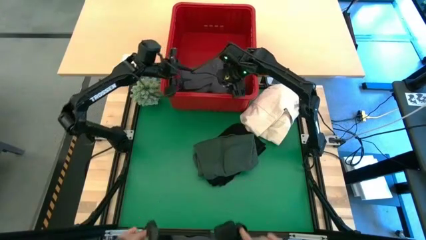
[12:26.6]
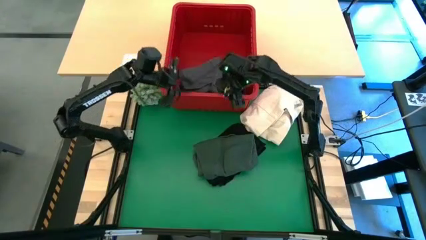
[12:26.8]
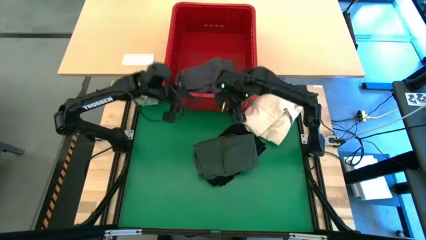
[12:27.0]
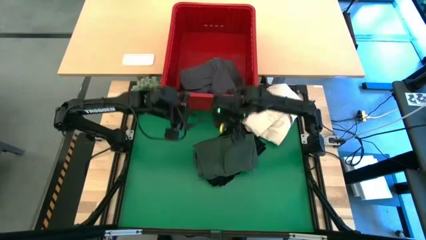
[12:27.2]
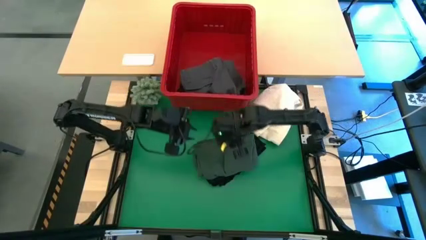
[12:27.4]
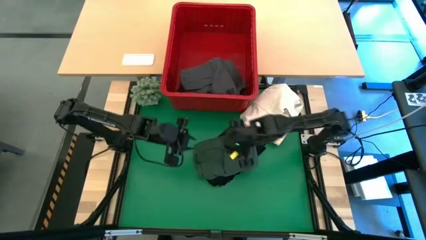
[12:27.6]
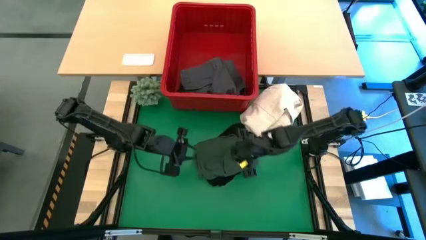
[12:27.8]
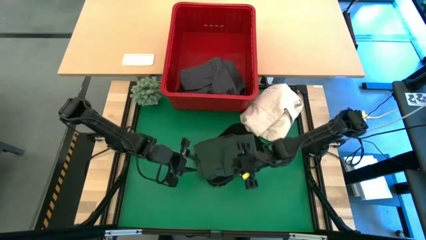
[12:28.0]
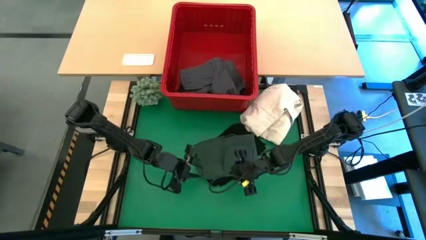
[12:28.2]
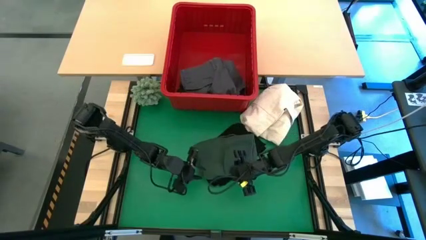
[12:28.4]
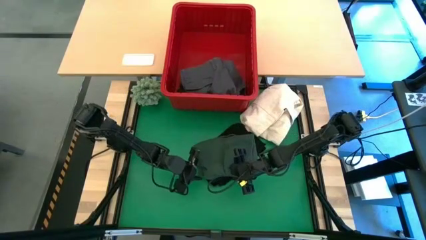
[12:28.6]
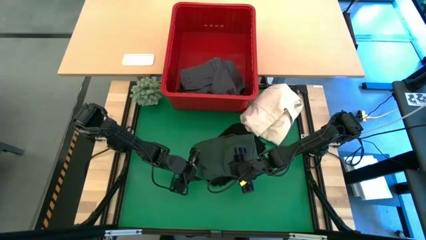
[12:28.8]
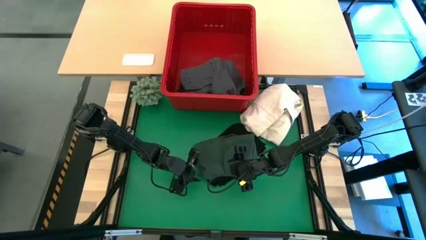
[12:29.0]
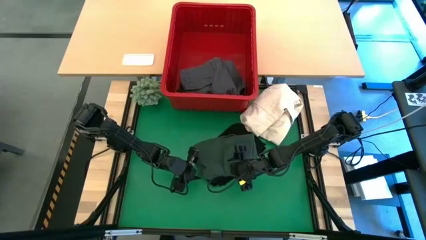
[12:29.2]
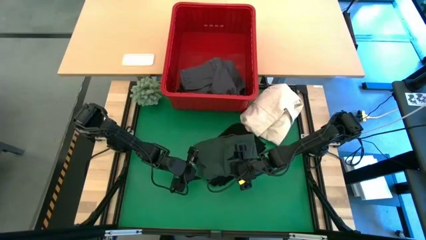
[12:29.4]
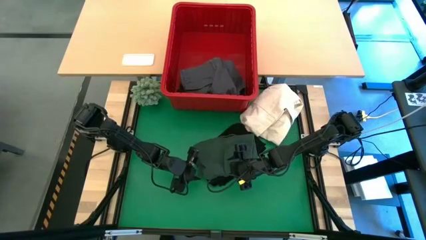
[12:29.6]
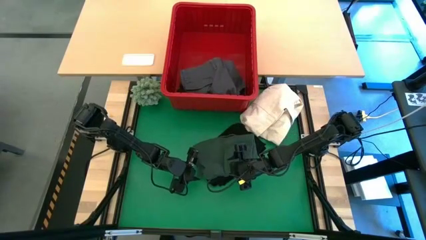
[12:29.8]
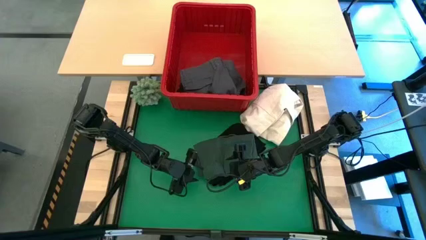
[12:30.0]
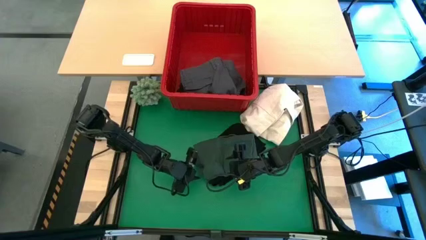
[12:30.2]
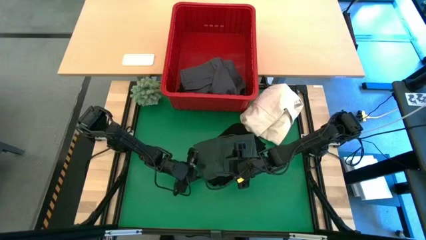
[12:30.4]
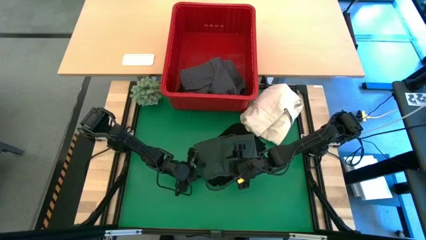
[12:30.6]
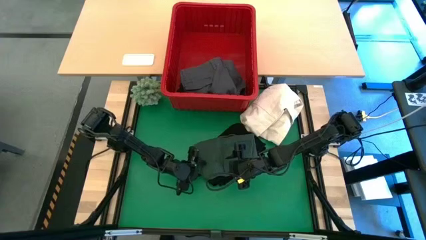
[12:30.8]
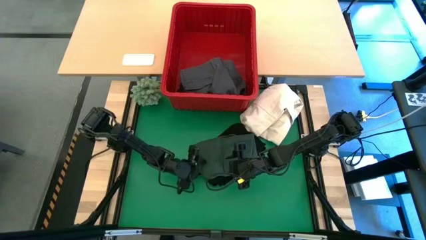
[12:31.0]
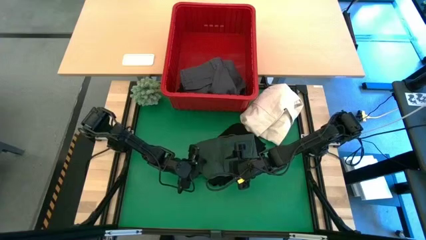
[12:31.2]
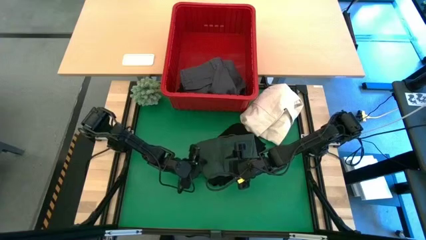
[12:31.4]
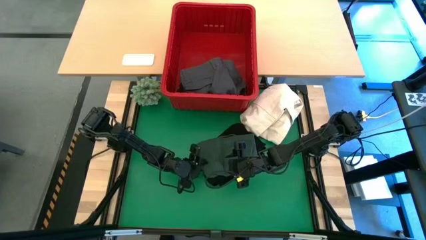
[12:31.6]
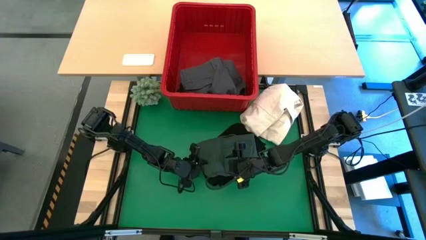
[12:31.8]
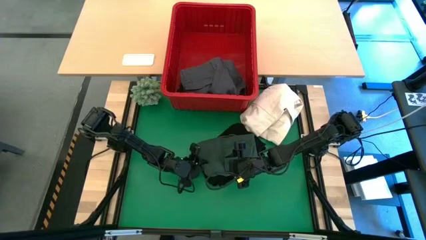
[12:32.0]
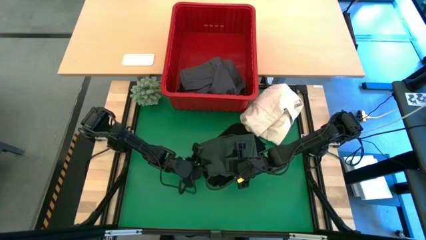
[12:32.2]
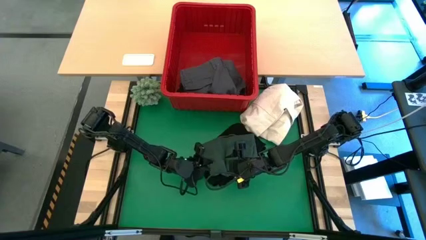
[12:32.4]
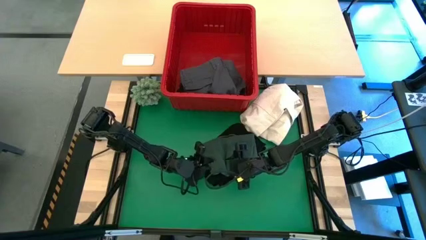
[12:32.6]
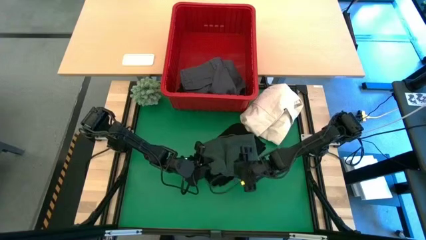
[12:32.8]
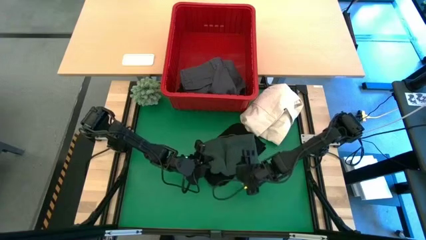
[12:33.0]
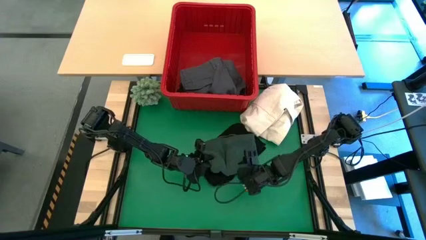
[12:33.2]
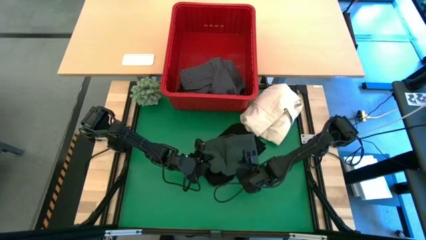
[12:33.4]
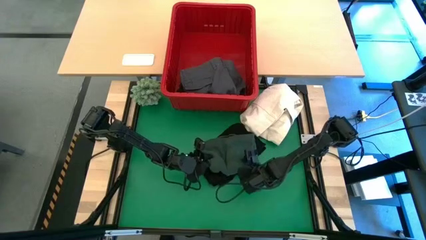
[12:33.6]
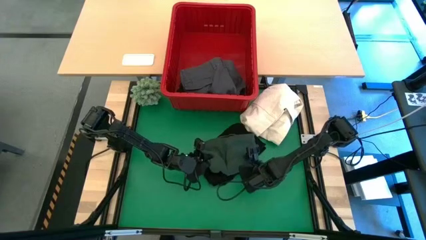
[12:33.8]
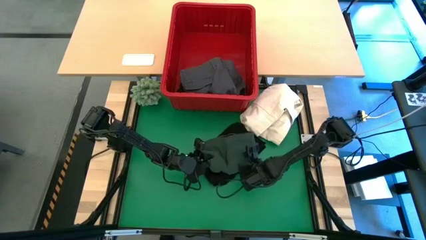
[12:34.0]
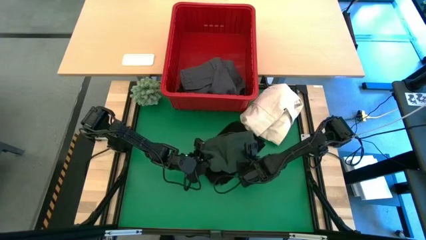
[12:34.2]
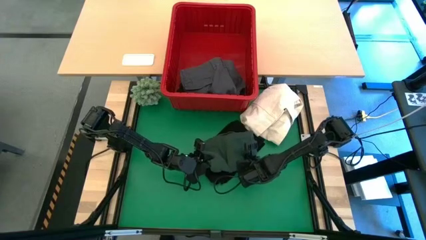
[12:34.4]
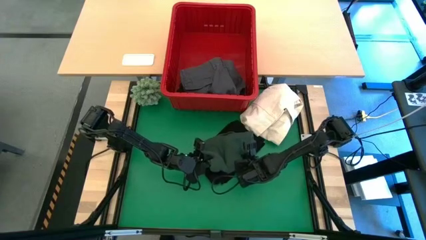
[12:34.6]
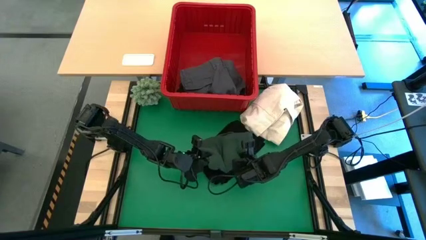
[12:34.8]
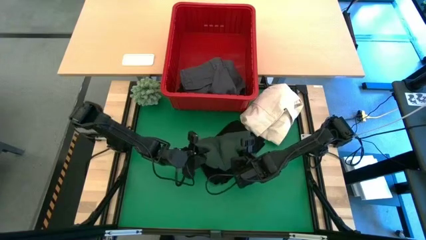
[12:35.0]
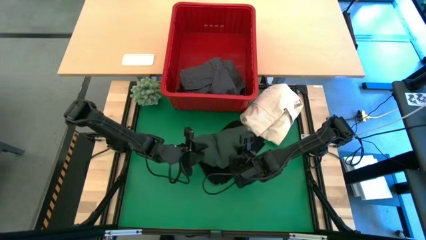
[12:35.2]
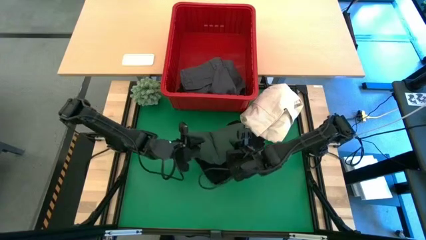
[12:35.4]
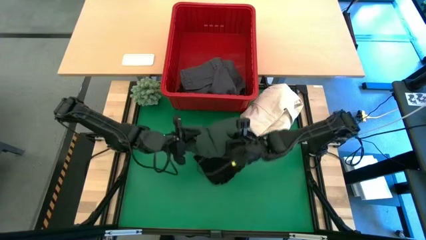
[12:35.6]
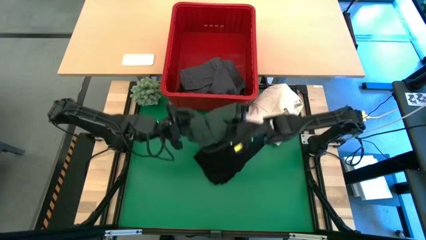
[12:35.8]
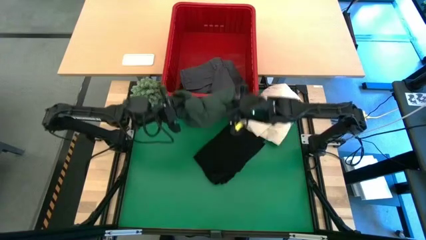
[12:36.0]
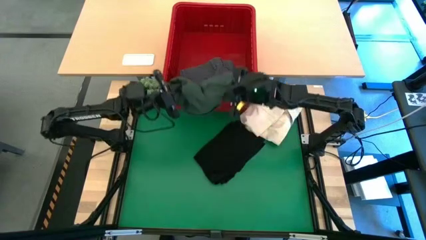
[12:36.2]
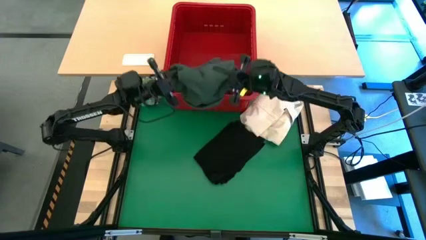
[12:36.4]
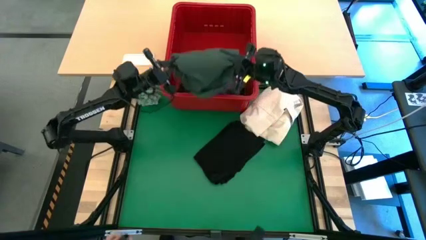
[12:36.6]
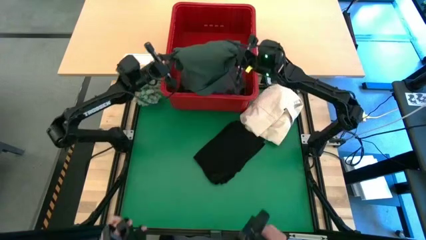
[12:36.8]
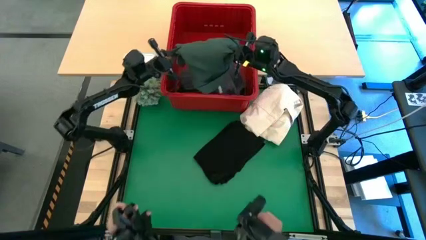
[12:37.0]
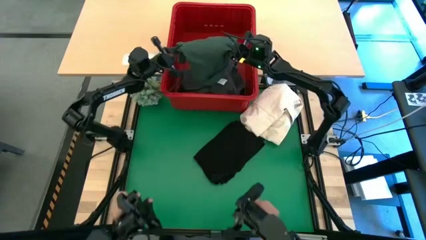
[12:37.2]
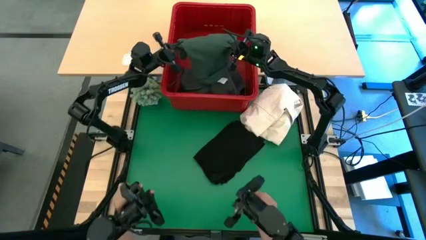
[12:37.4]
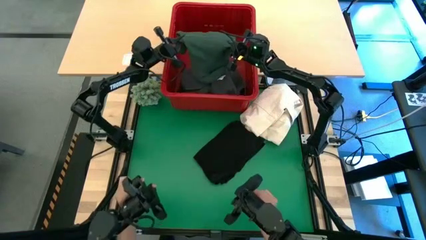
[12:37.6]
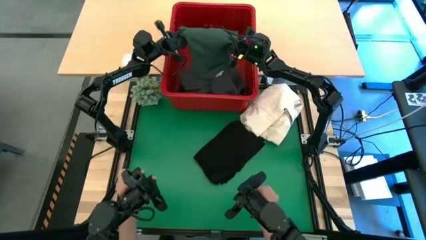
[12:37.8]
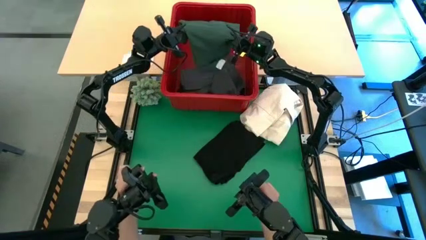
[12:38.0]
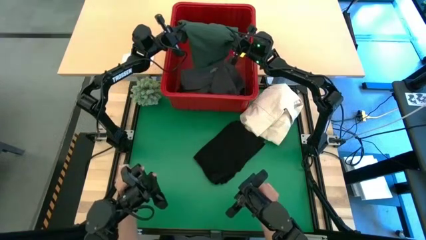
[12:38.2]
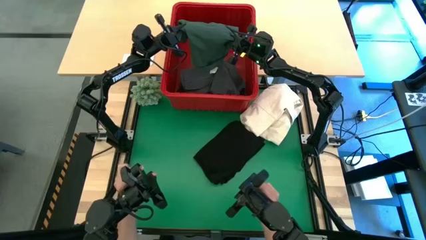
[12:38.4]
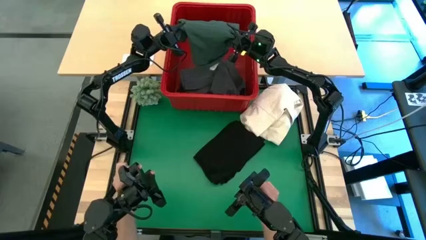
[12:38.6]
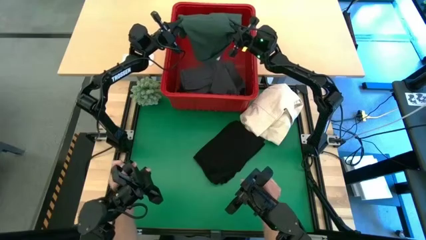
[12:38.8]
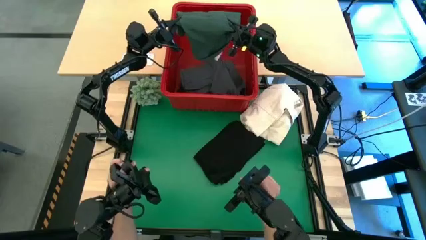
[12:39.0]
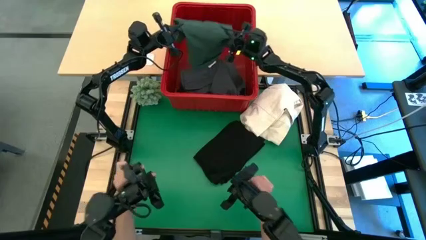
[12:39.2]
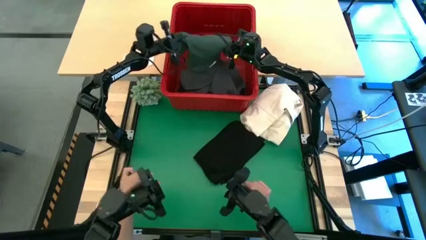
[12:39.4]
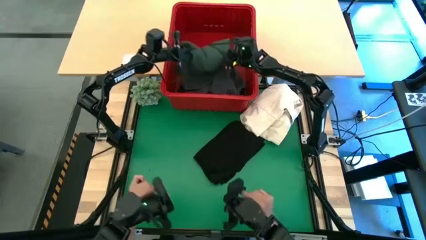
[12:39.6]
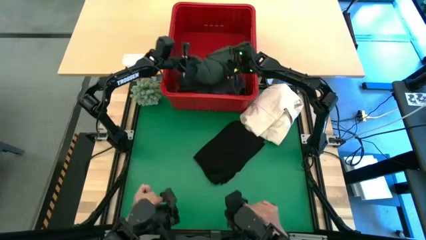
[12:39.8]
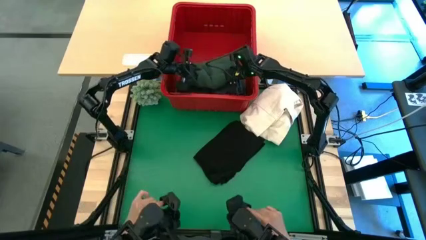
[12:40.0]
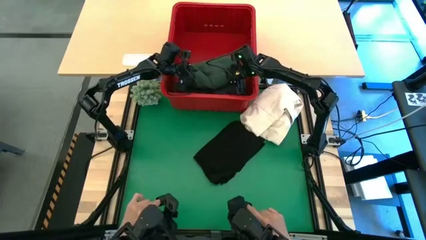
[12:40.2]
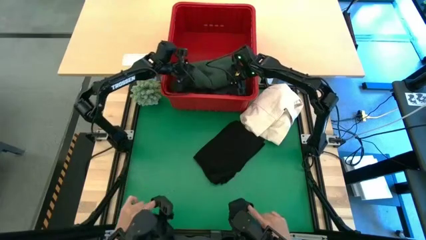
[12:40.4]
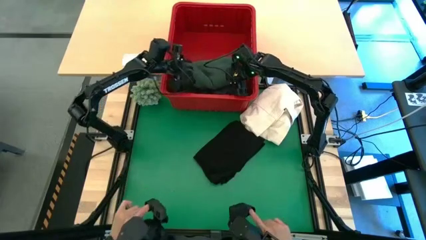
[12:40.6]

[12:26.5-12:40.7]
Task: Fold laundry
Put the green folded polo shirt into the red bin

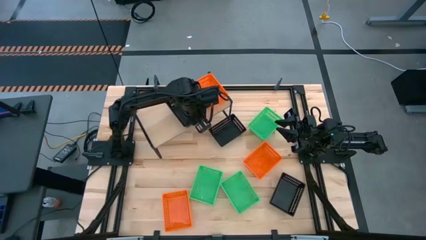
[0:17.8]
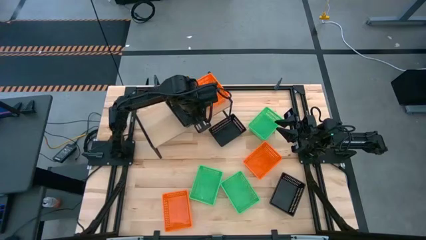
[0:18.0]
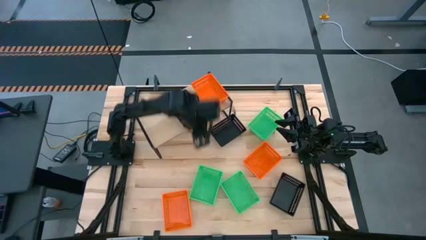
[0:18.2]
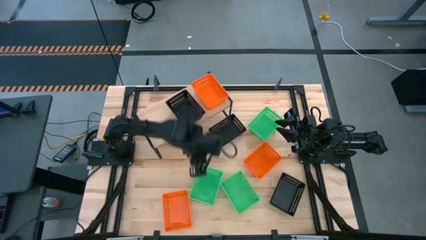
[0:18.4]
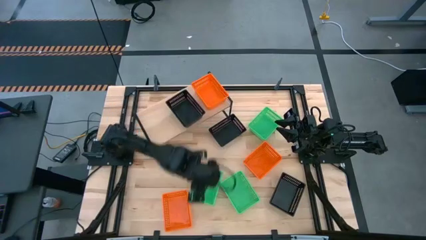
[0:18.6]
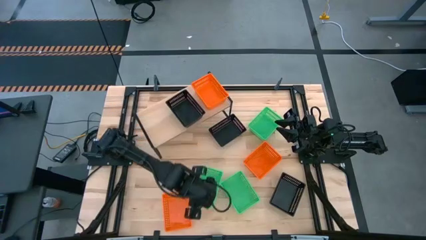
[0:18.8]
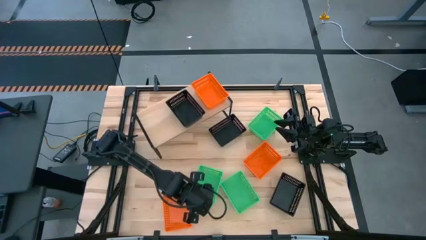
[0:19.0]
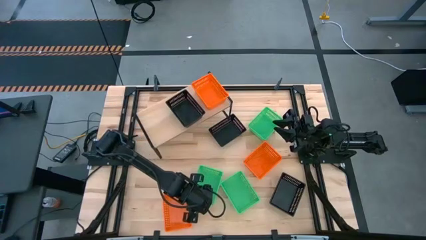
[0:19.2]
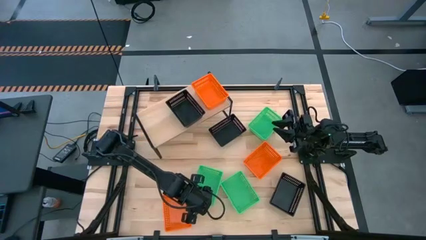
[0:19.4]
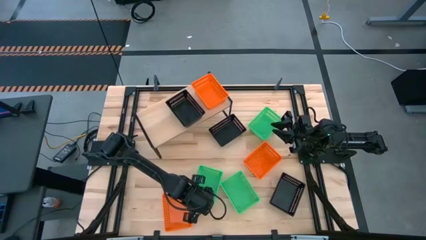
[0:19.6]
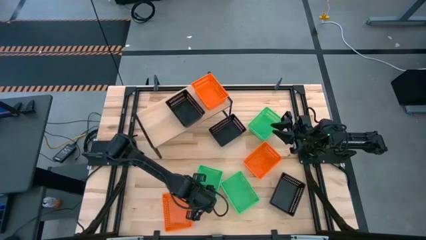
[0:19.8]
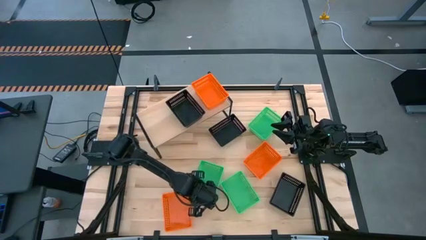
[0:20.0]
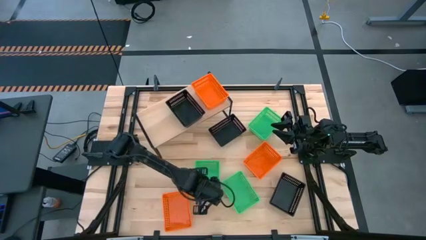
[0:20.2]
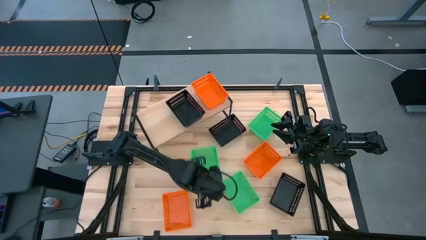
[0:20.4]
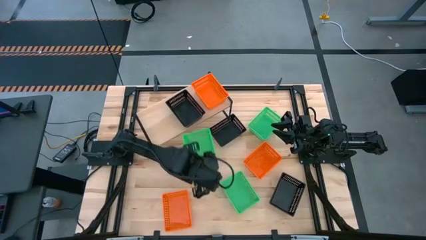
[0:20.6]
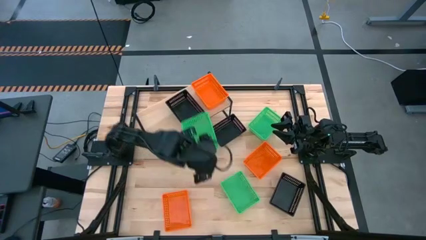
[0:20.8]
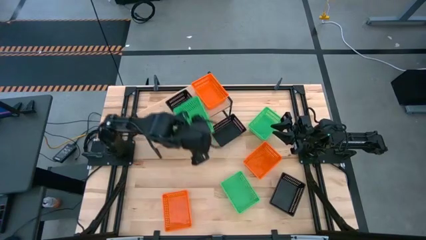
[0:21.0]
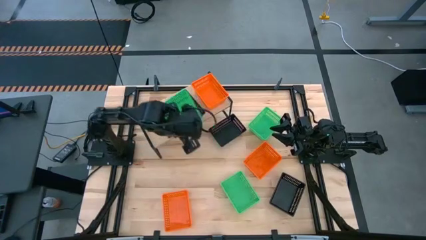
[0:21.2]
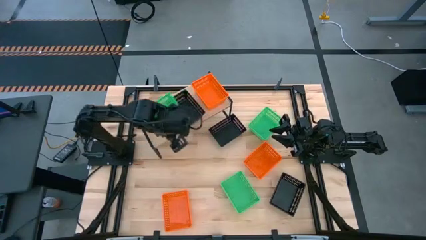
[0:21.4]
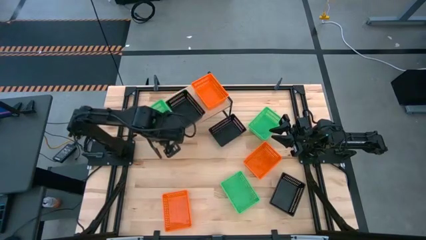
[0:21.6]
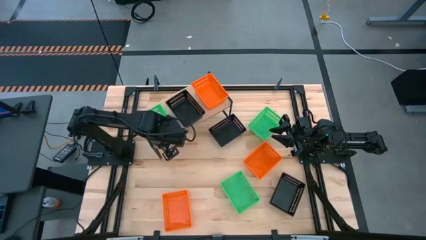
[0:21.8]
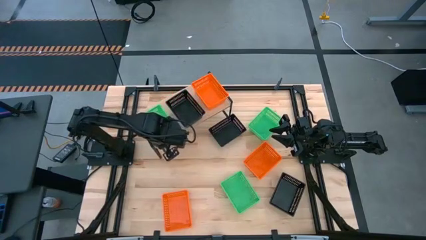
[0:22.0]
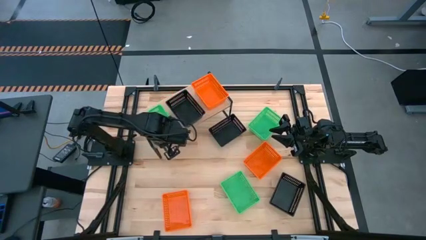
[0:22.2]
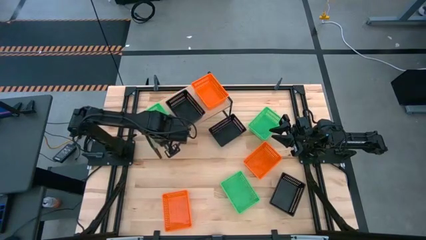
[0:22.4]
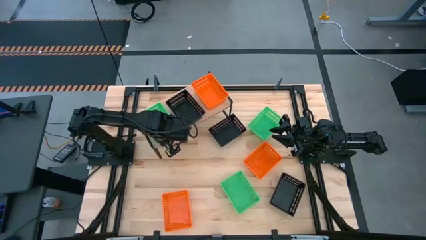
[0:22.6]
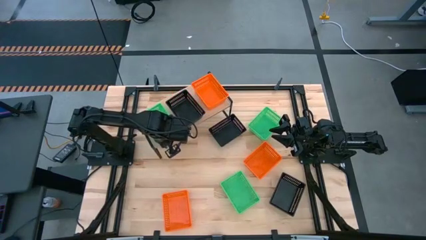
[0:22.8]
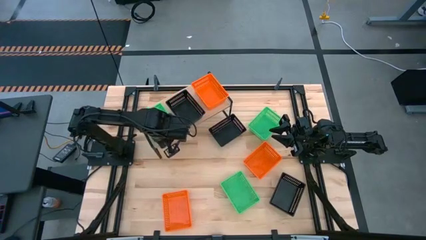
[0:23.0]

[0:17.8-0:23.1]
Task: Stack baskets on shelf by color
Put the bottom left green basket on the shelf
